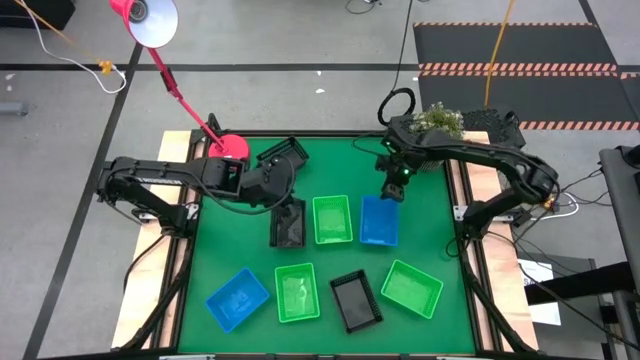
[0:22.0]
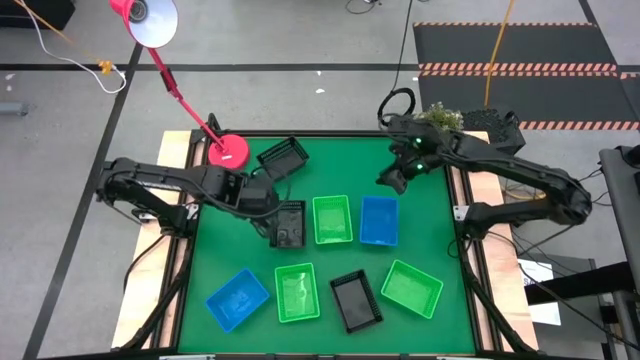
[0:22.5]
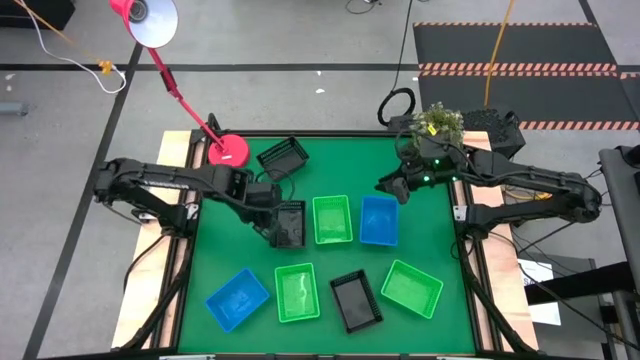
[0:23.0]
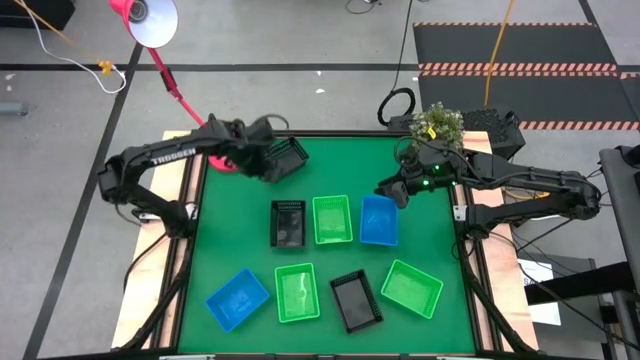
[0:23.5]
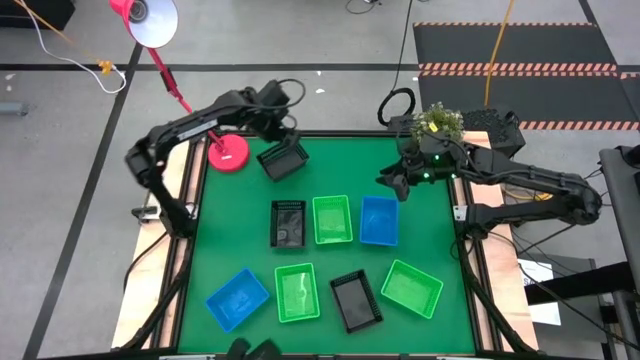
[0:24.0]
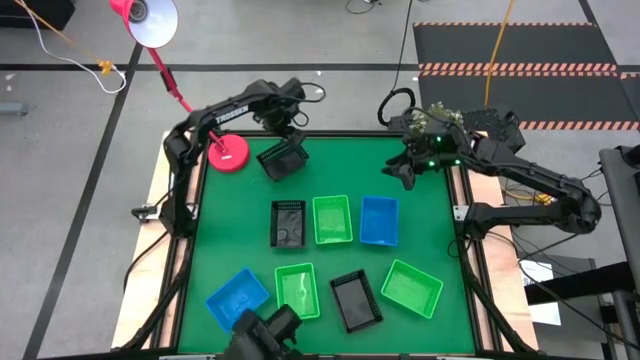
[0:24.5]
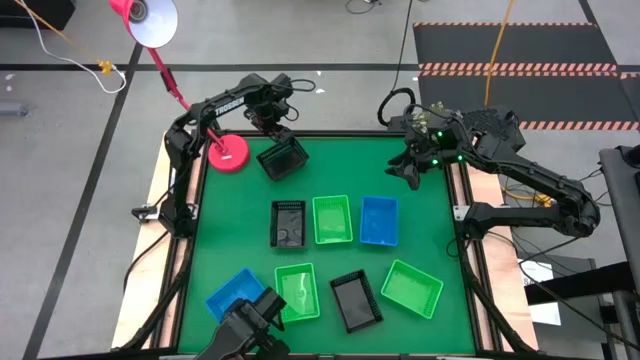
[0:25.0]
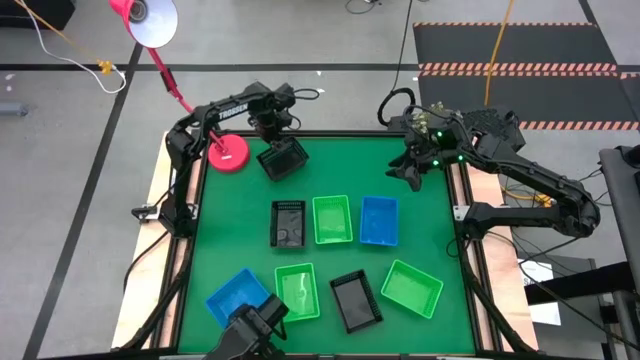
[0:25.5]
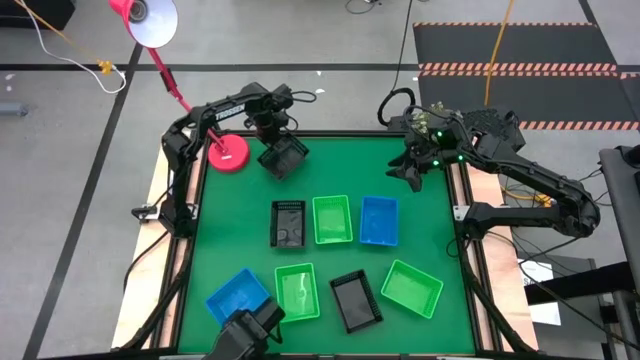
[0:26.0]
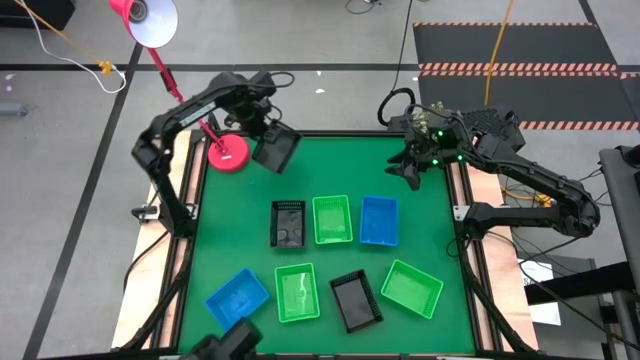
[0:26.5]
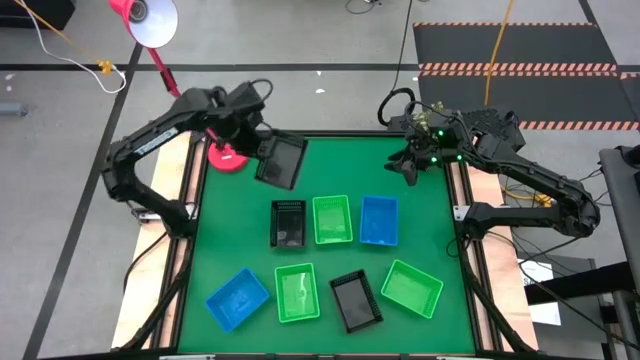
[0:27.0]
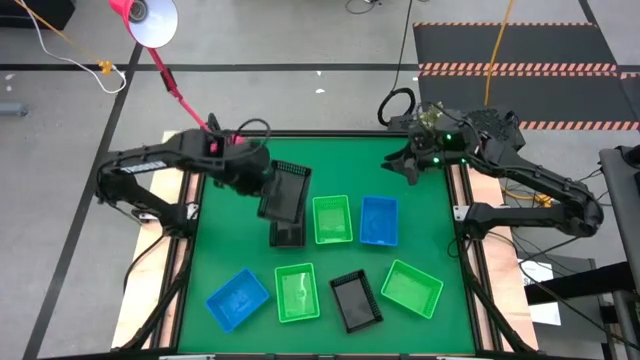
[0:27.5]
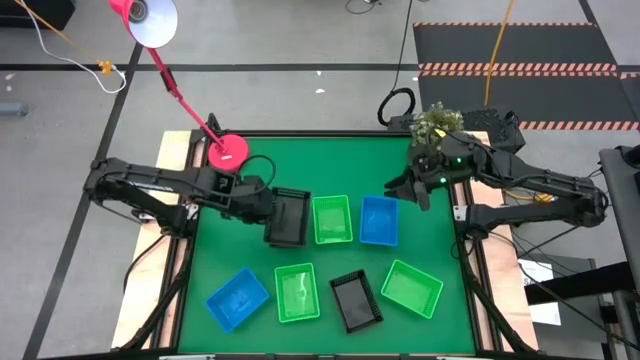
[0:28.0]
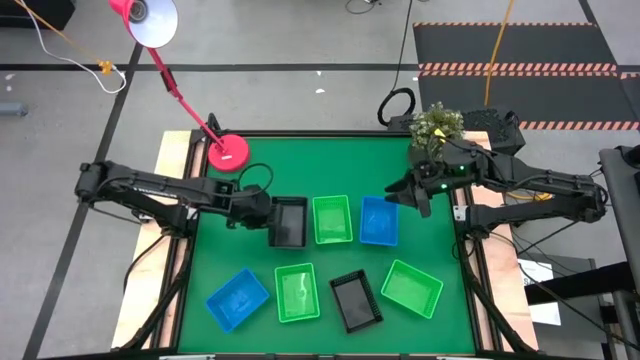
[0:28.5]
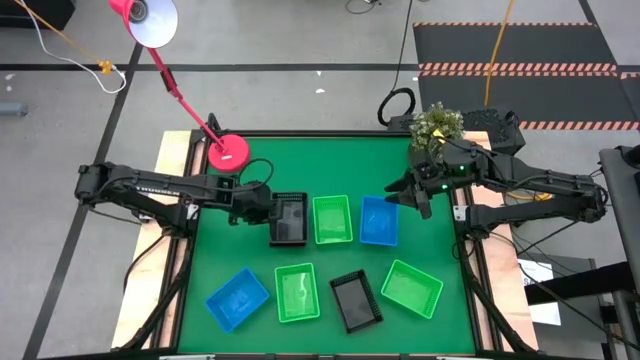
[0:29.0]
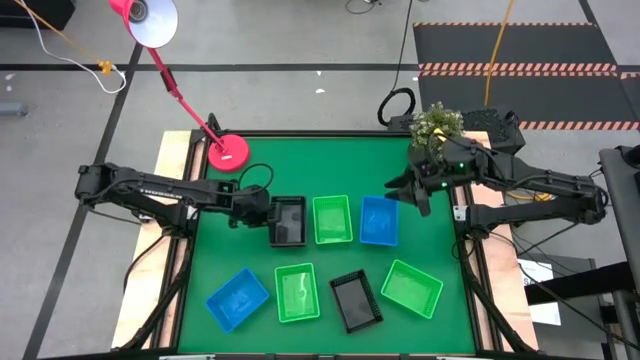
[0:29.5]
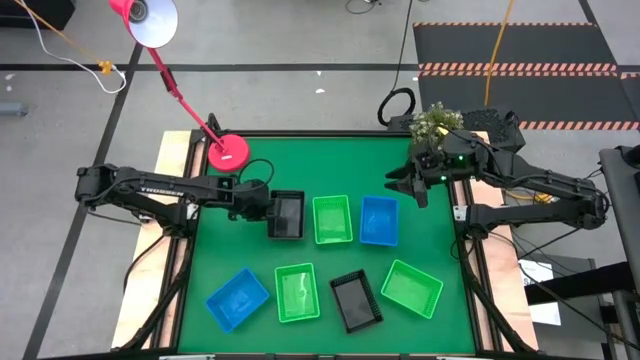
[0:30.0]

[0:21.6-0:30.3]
Stack the top black bin on the middle black bin

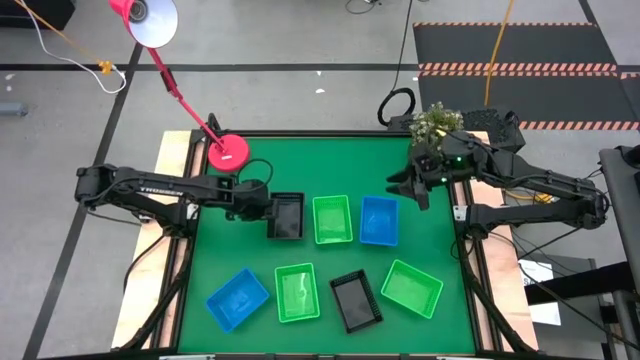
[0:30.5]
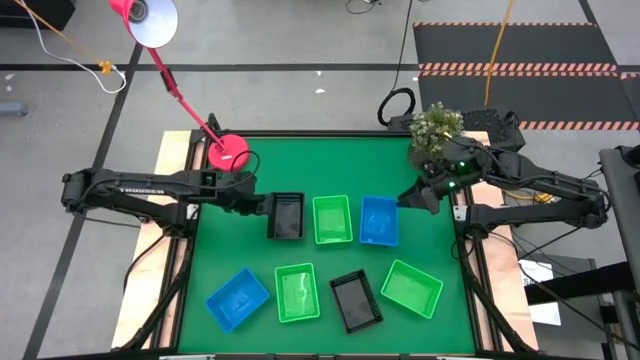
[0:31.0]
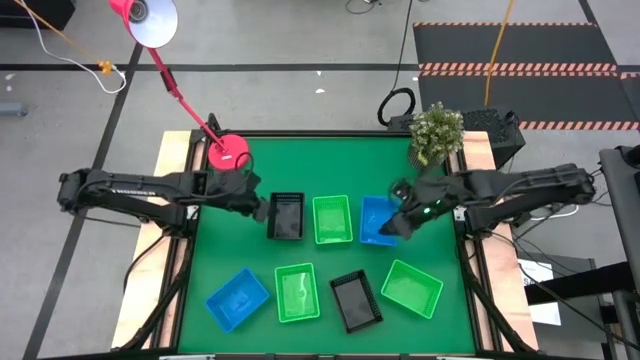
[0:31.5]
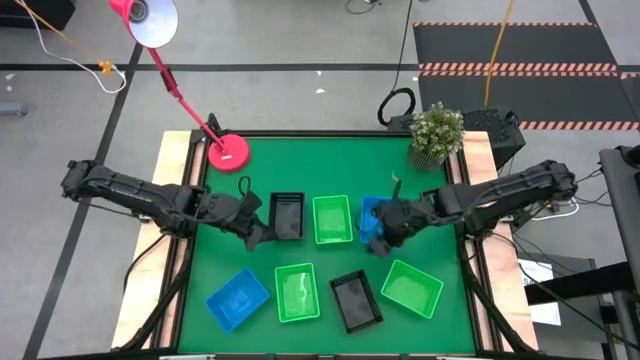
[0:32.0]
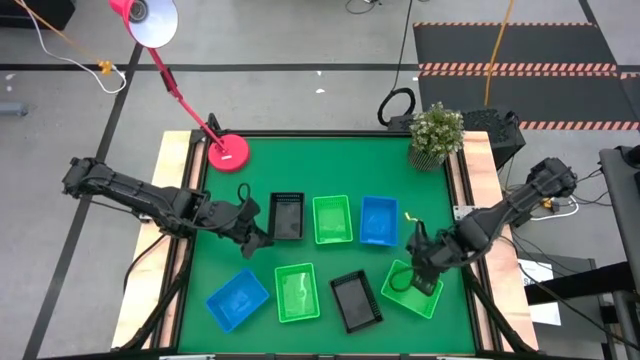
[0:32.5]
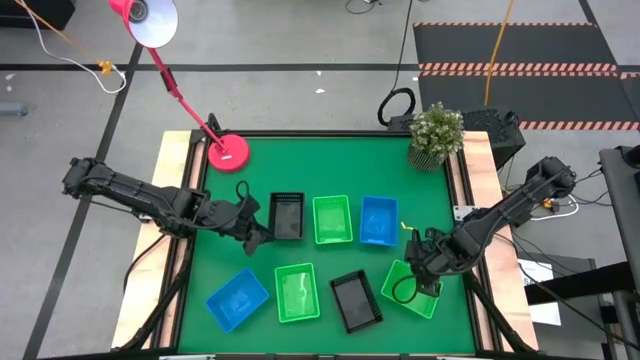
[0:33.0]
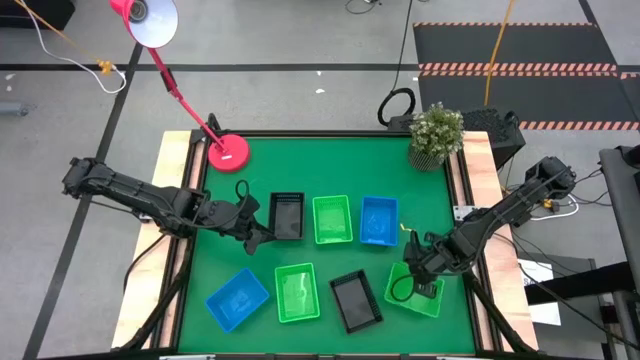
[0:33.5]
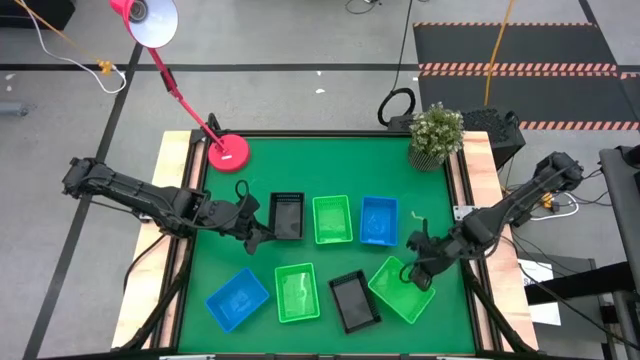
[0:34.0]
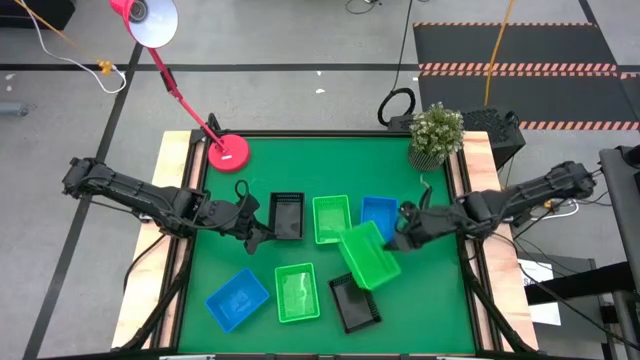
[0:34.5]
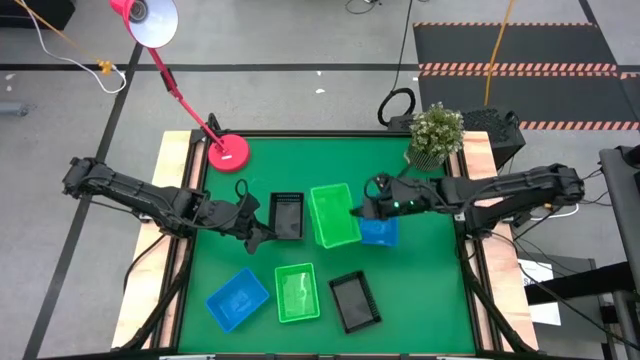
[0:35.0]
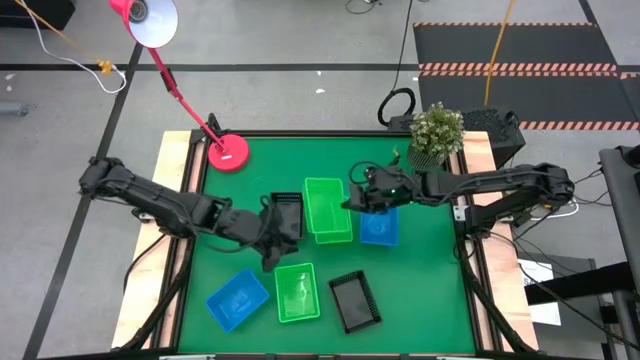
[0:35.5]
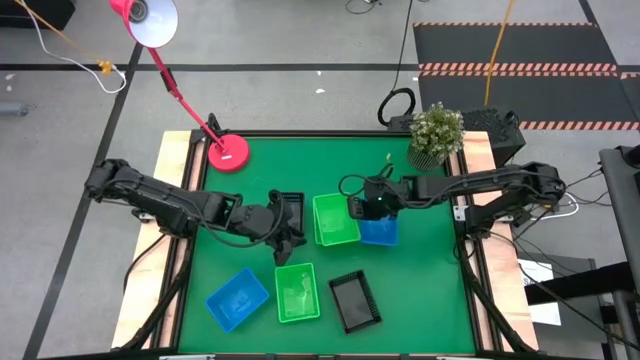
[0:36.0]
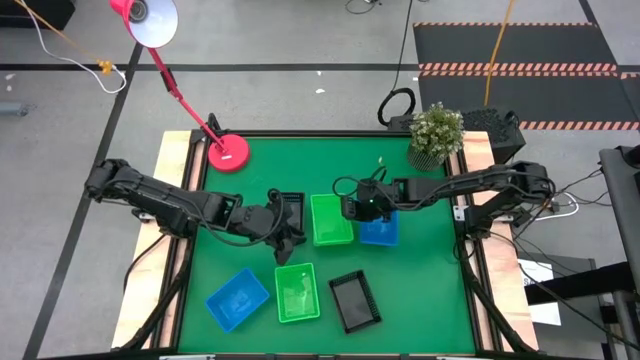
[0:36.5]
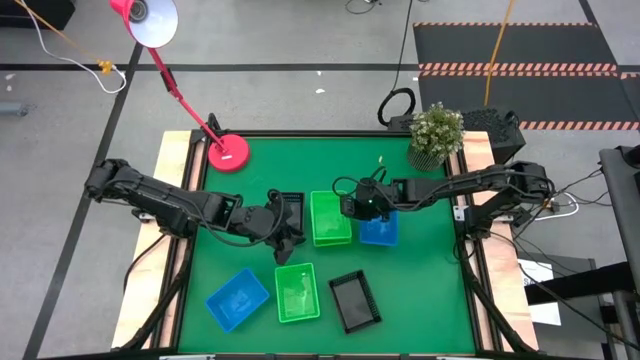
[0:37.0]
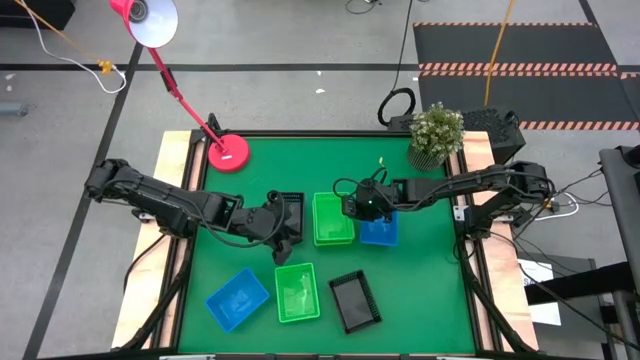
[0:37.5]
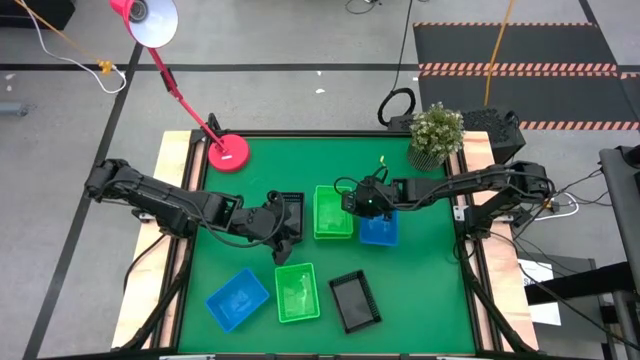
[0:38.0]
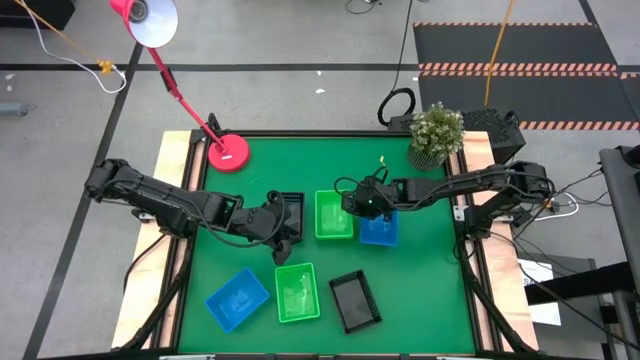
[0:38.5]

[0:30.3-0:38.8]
Stack the bottom right green bin on the top green bin

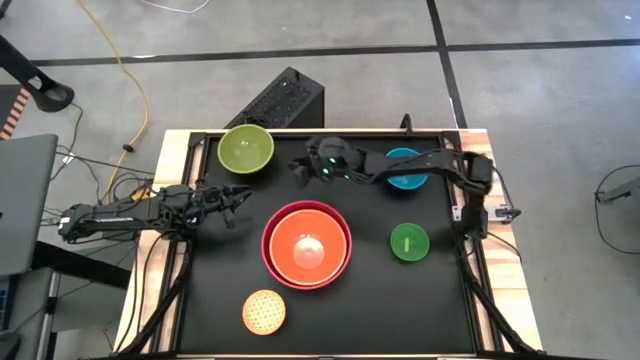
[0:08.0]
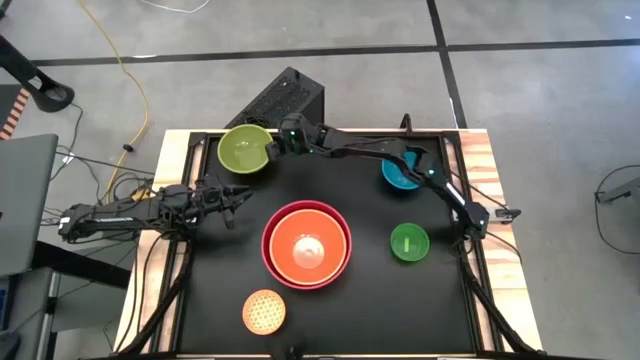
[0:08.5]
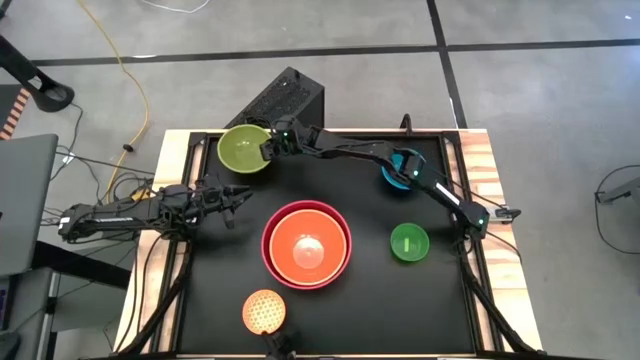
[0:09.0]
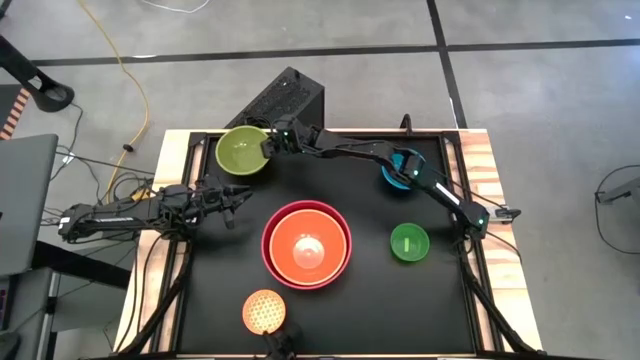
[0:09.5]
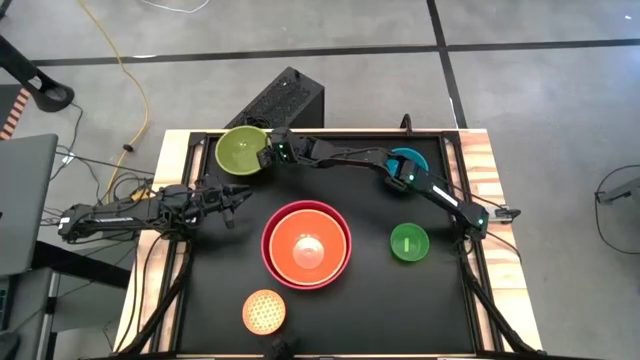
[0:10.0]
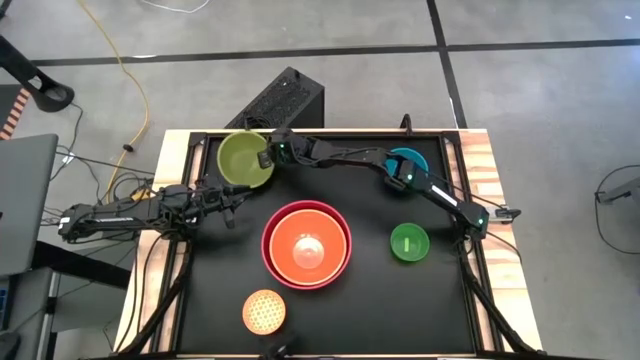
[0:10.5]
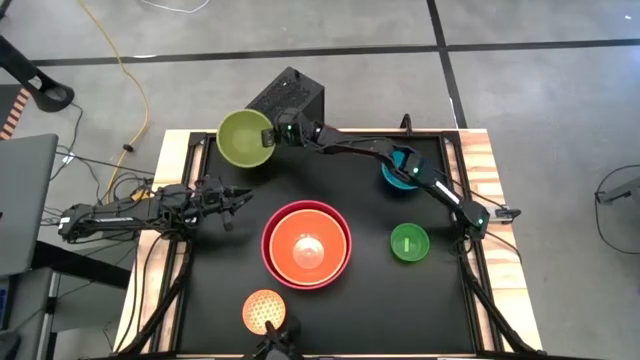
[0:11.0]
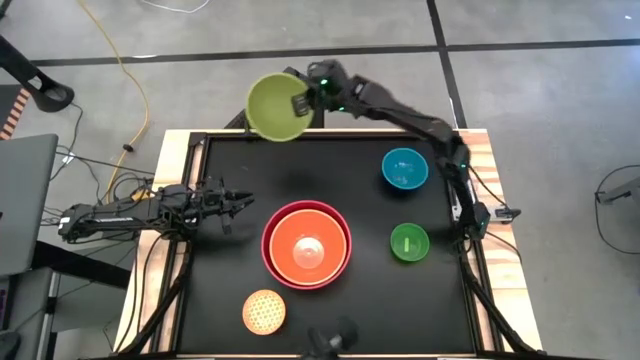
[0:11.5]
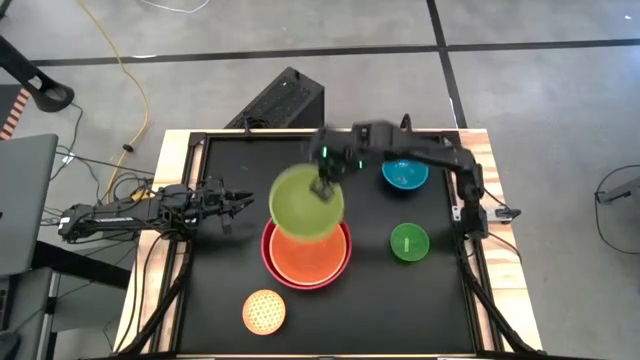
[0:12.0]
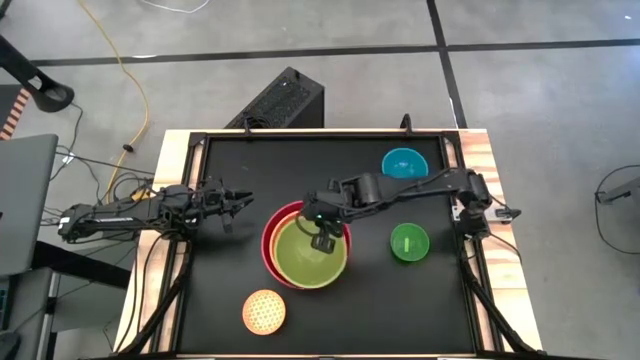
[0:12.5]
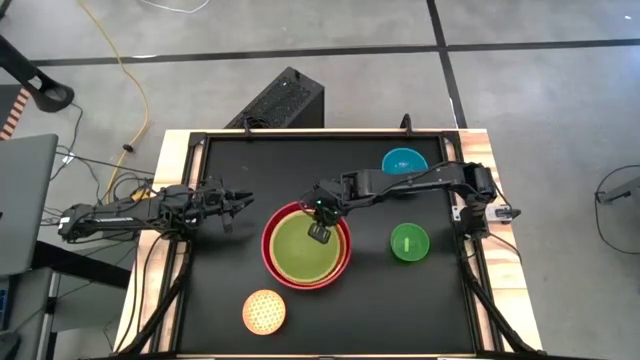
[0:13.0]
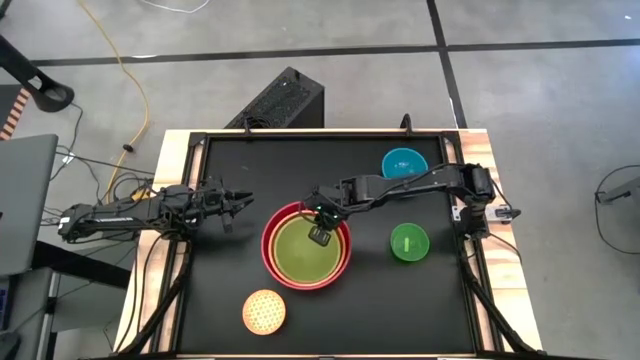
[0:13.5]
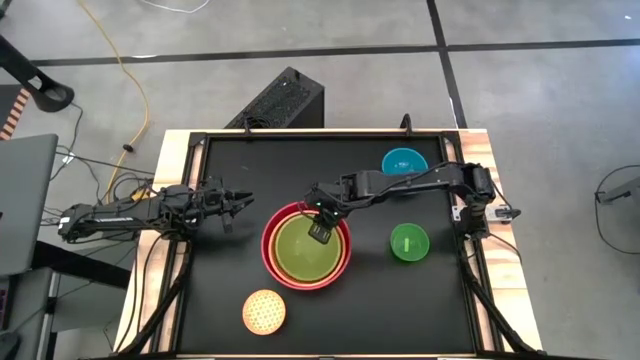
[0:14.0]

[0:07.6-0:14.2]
Stack the light green bowl on top of the orange bowl
